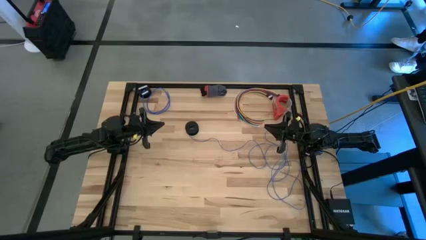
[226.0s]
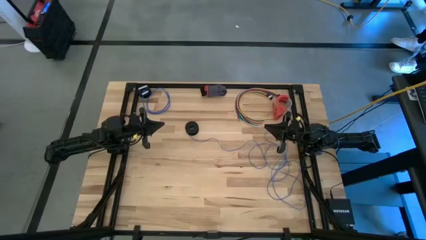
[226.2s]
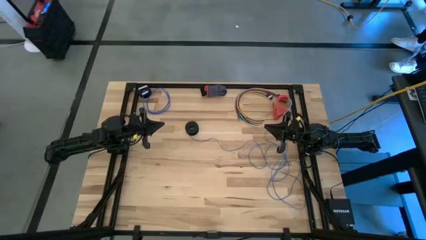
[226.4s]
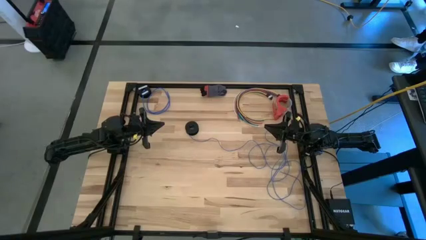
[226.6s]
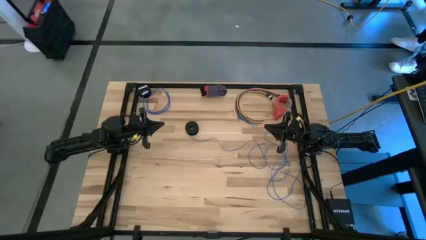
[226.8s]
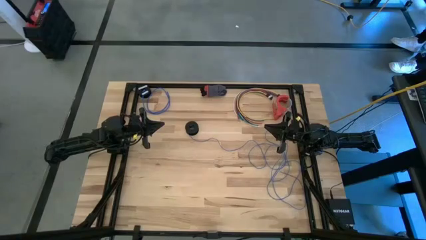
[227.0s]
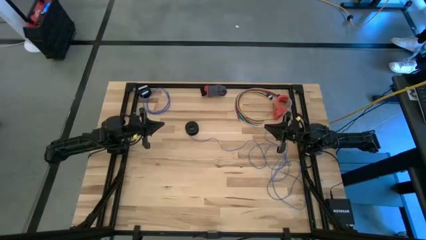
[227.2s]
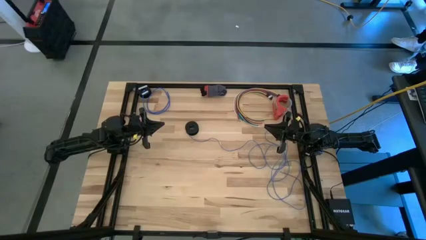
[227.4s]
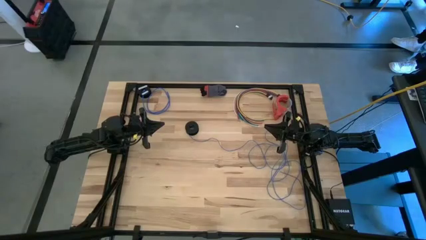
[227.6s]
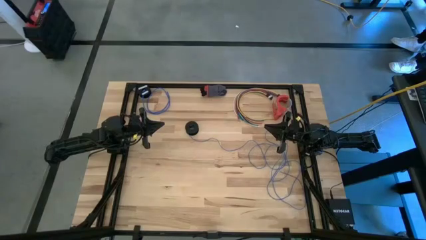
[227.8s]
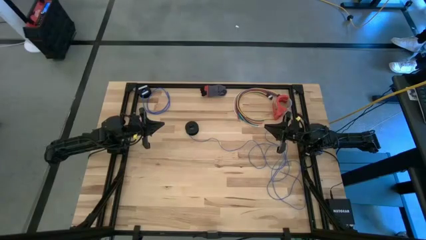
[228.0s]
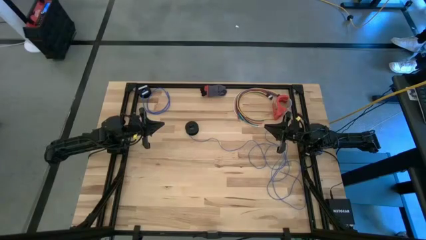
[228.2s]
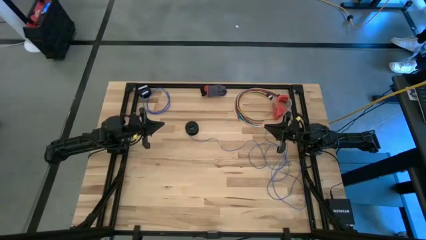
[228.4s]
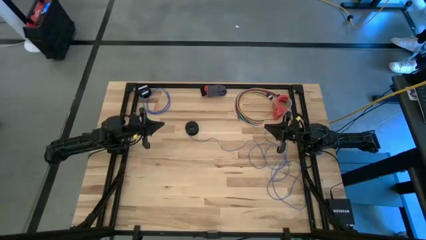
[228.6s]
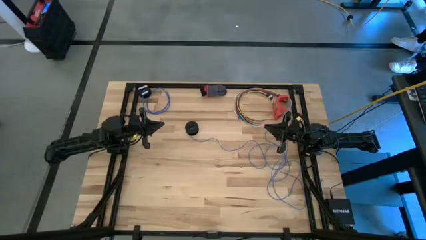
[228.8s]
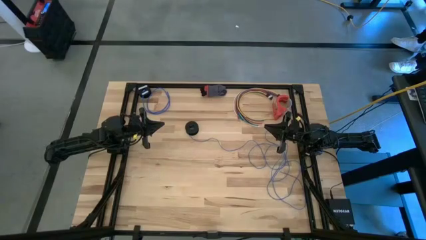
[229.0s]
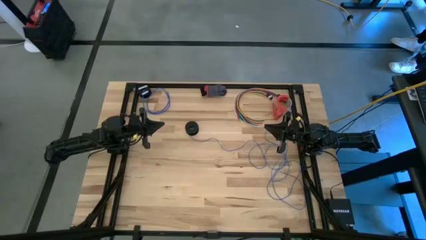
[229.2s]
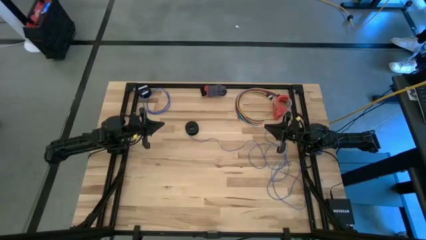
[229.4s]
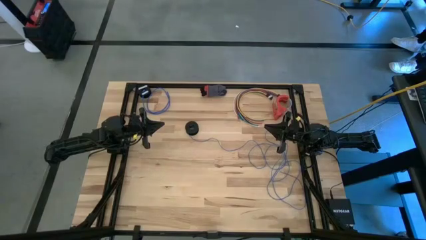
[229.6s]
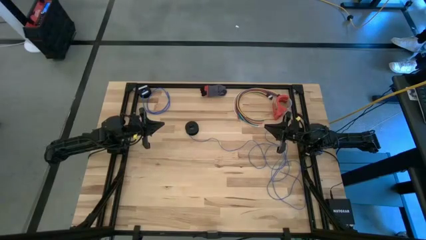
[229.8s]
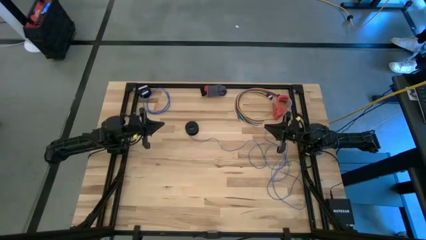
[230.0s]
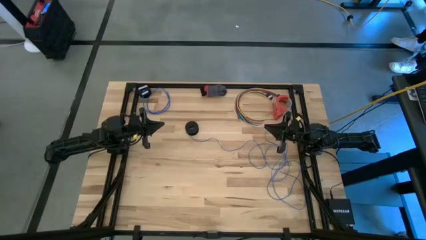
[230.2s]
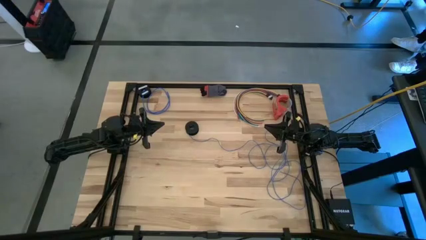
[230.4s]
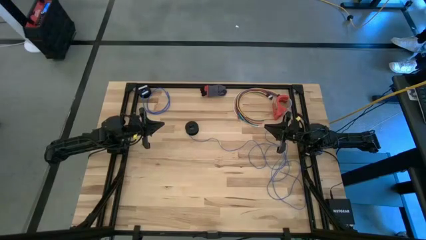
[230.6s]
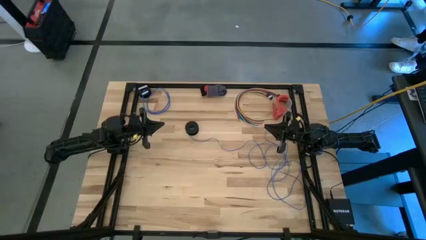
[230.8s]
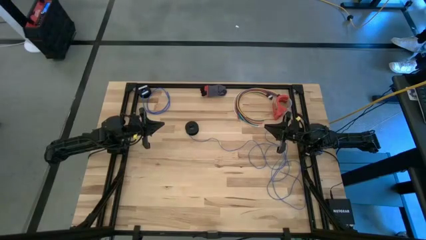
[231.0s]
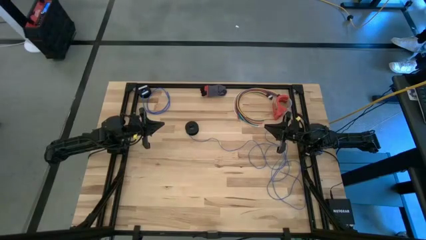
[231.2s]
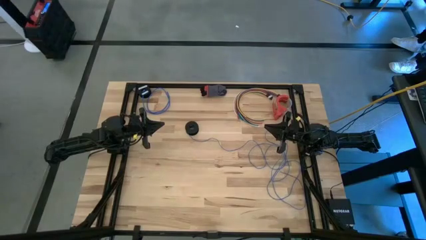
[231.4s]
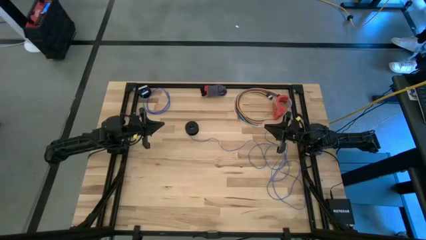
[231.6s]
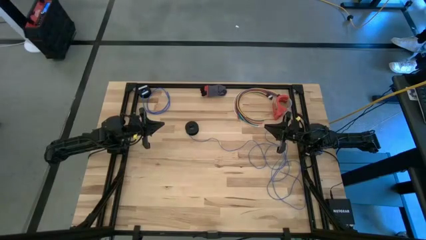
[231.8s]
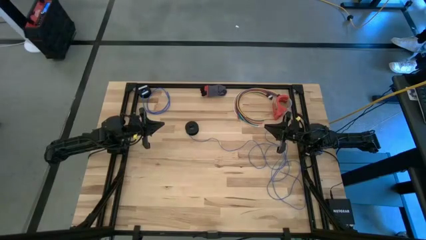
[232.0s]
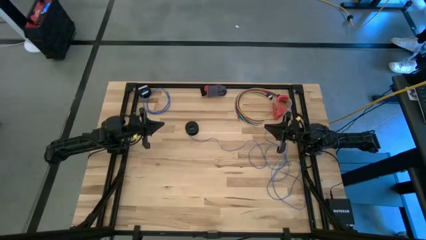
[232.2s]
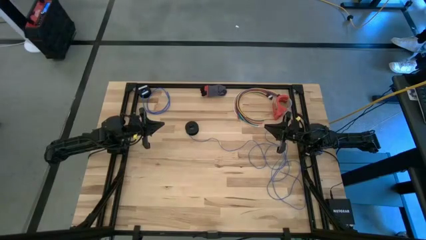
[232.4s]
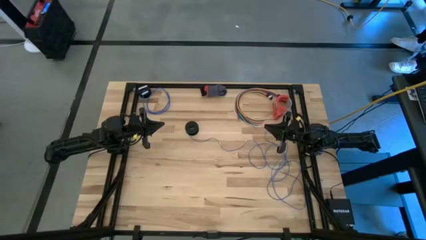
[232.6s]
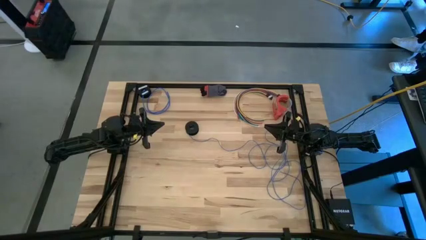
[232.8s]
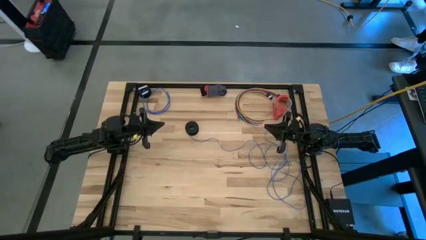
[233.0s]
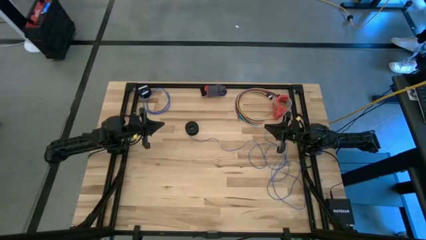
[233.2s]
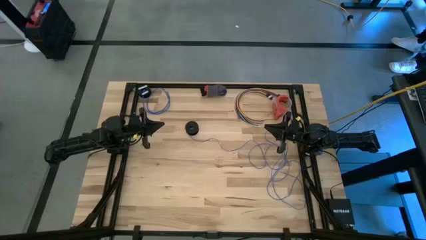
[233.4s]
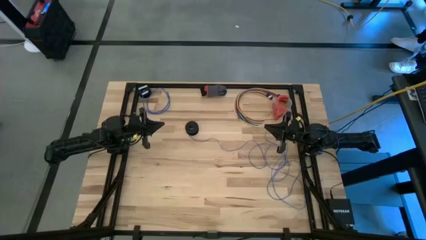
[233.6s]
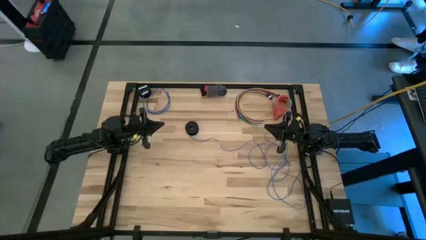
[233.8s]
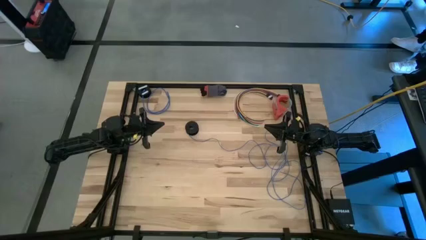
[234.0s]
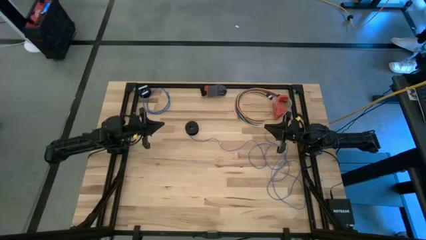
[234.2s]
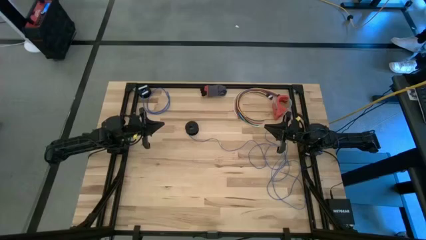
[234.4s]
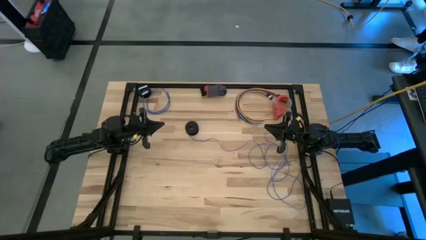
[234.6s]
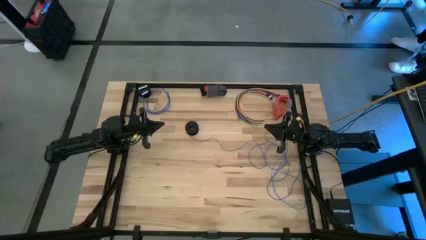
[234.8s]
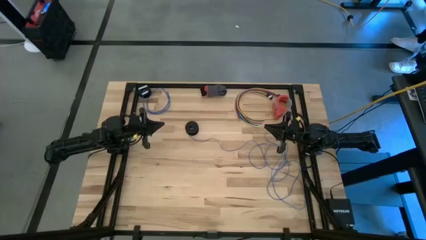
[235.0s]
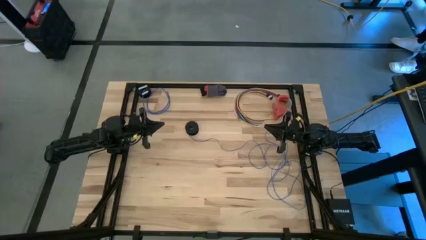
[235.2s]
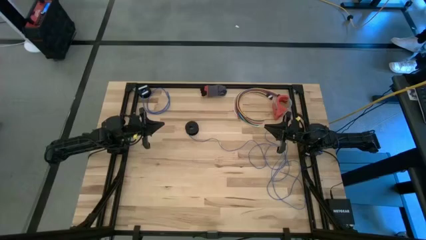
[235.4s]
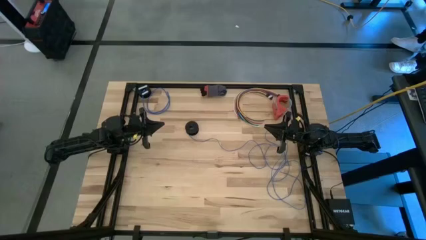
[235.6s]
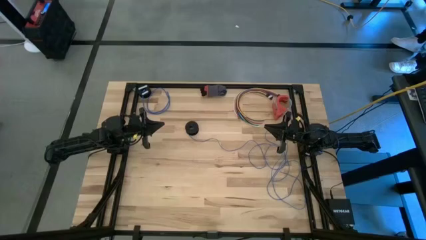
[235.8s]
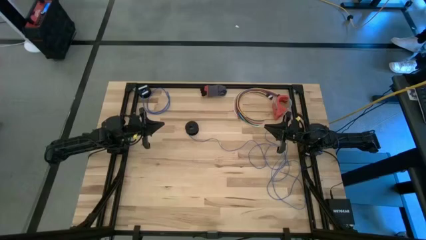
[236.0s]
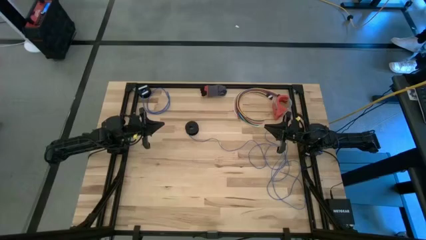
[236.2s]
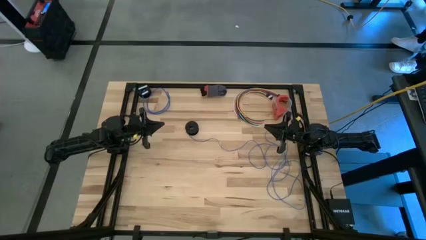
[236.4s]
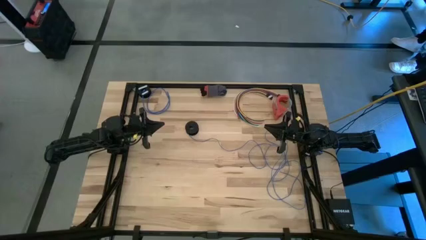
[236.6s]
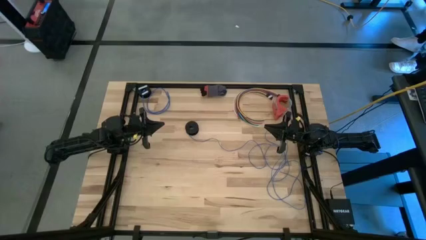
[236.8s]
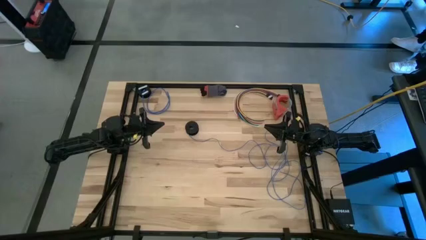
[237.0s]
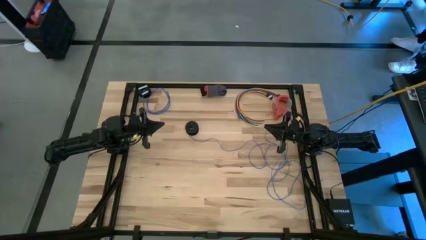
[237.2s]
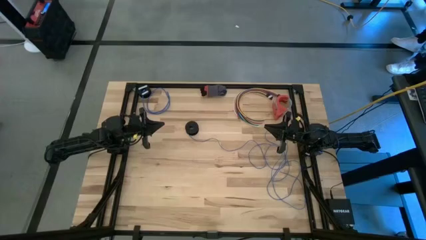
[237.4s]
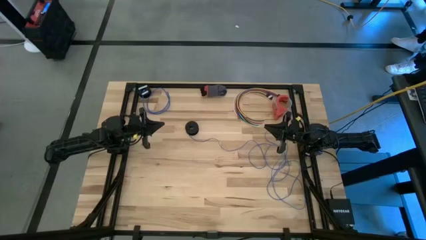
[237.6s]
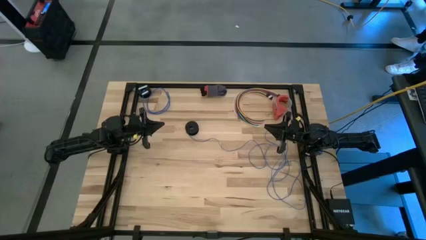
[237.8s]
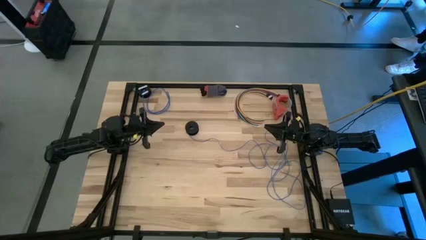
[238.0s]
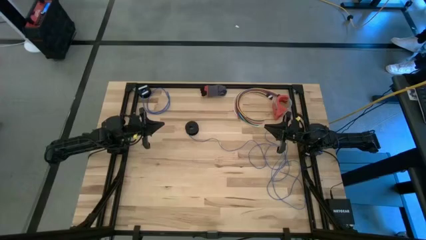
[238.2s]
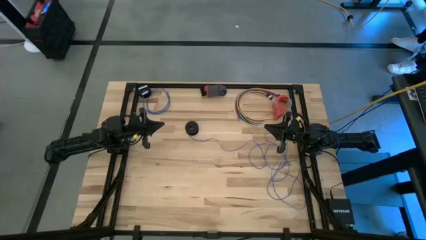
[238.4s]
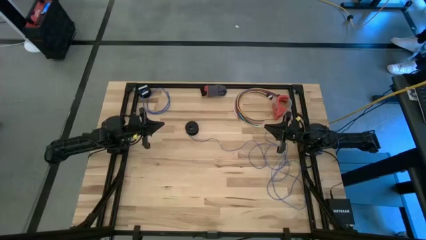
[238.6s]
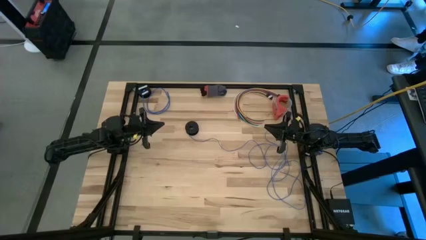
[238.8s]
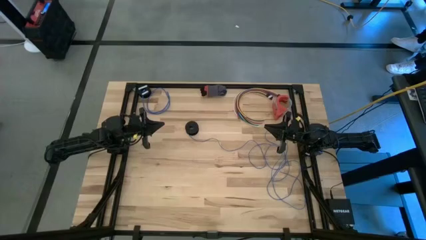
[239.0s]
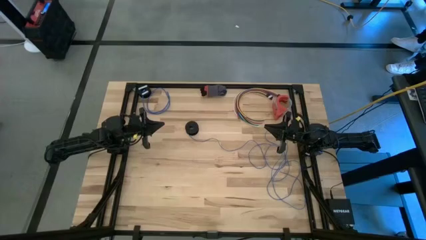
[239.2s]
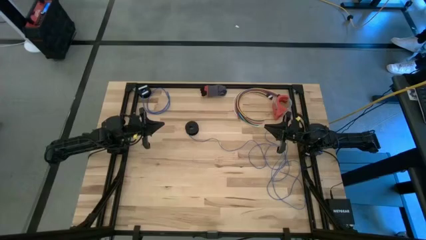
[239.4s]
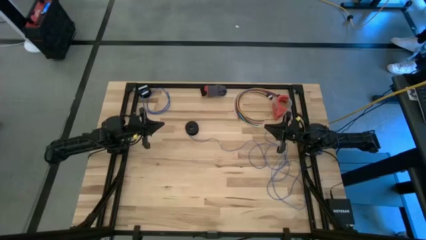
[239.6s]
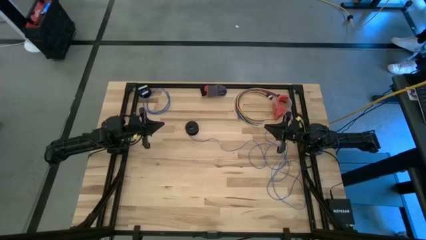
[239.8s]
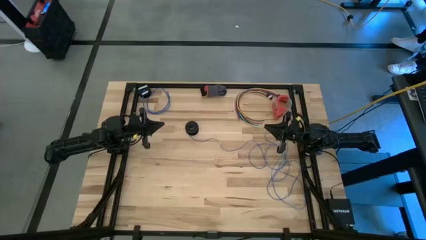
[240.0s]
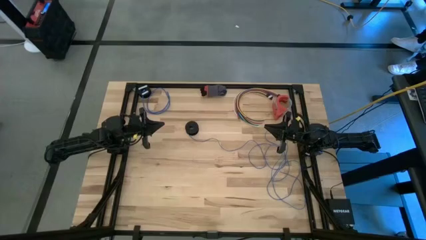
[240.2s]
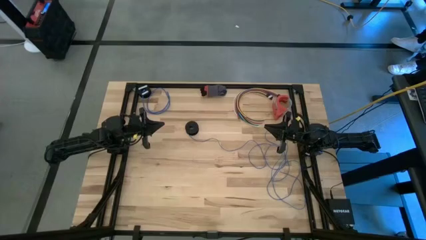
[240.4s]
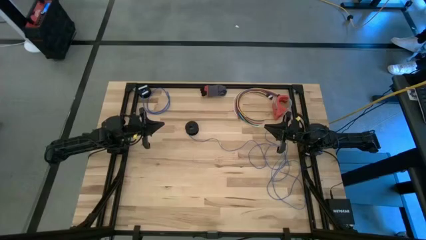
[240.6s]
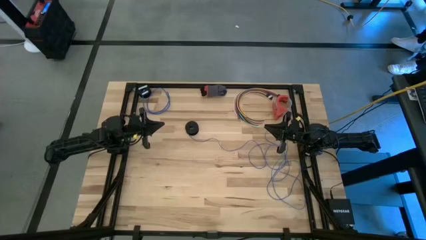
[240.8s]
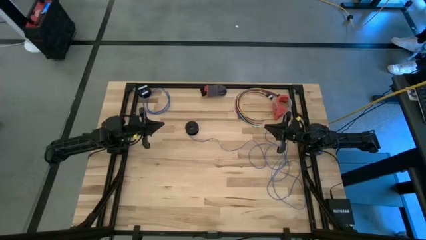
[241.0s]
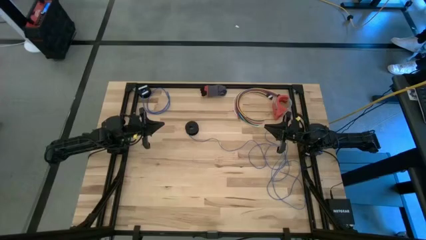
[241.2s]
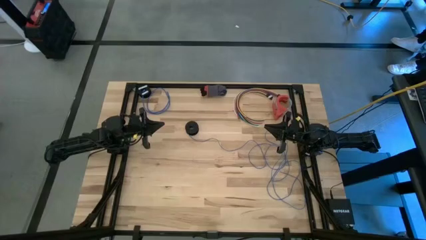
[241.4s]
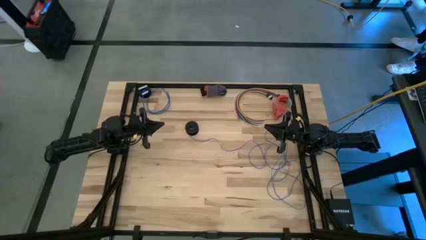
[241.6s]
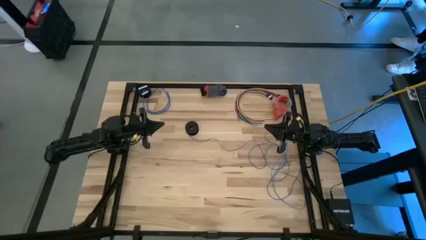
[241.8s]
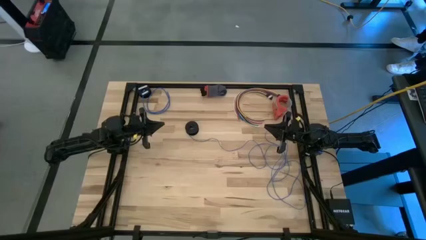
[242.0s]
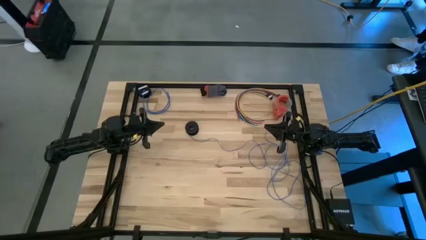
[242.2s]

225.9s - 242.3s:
Task: Coil cords
Return to Home Position
